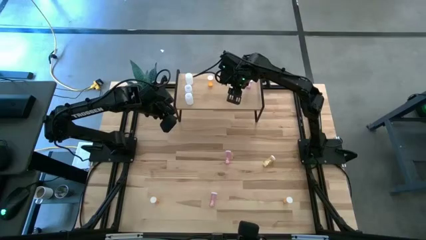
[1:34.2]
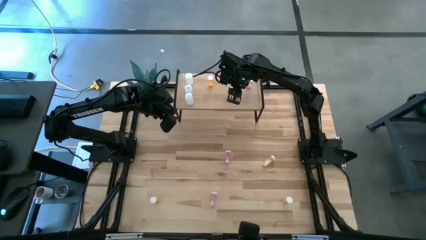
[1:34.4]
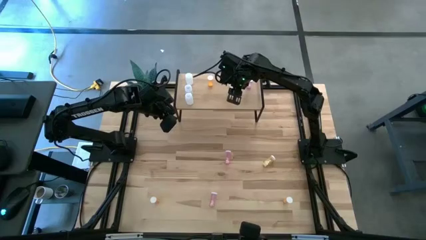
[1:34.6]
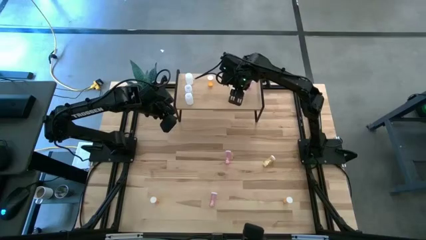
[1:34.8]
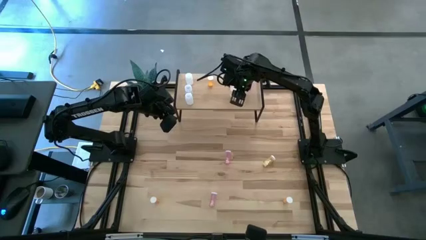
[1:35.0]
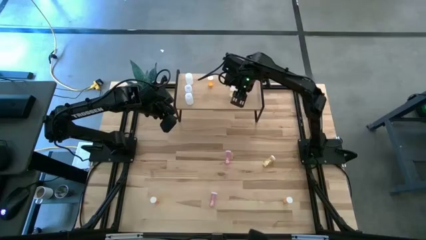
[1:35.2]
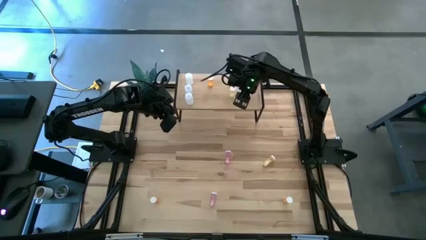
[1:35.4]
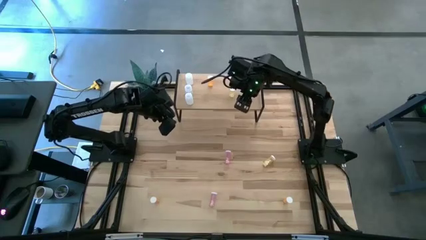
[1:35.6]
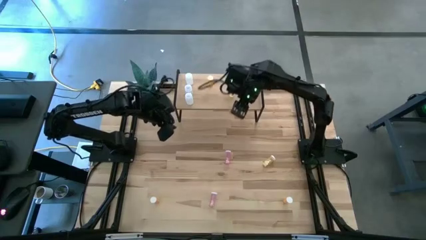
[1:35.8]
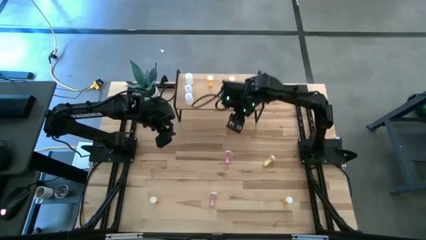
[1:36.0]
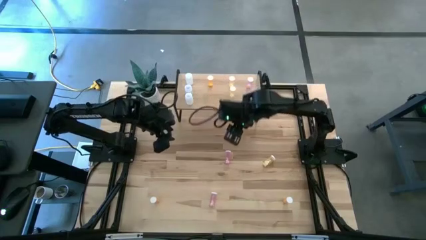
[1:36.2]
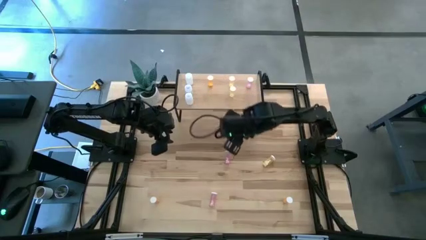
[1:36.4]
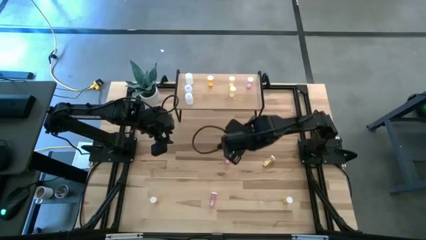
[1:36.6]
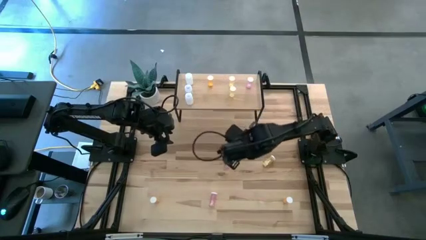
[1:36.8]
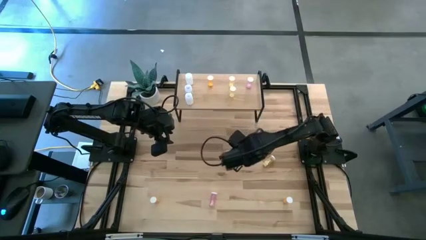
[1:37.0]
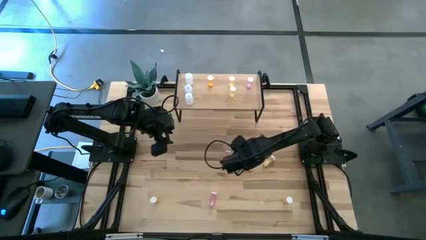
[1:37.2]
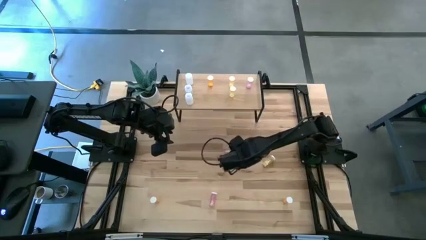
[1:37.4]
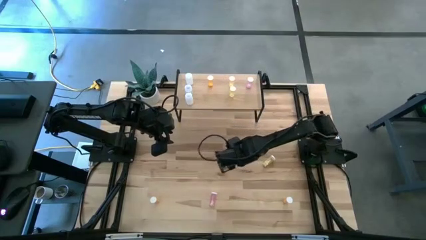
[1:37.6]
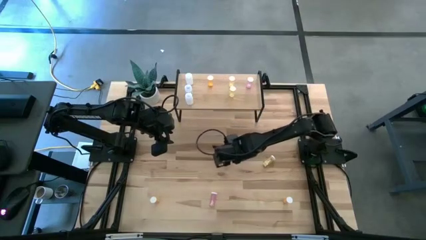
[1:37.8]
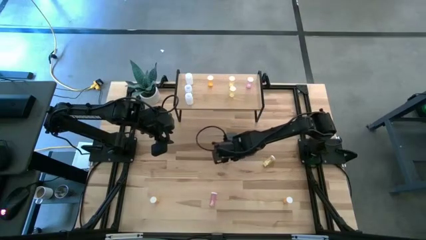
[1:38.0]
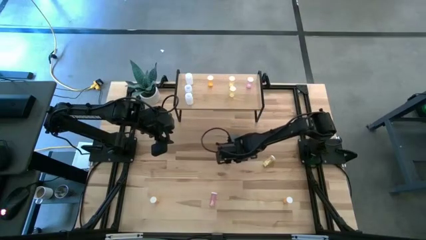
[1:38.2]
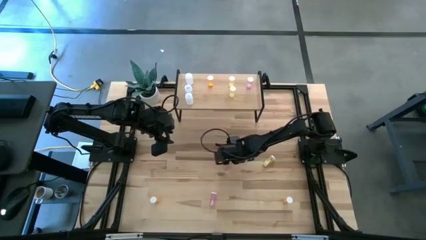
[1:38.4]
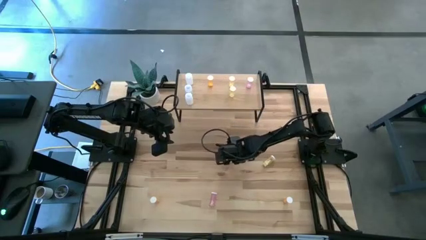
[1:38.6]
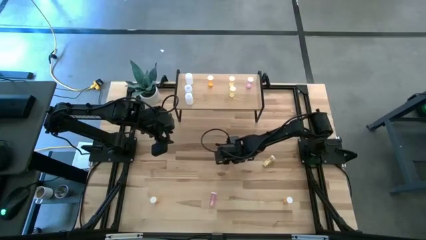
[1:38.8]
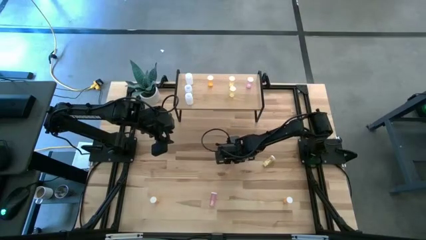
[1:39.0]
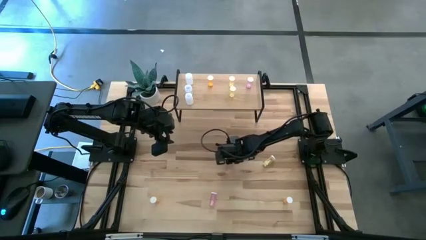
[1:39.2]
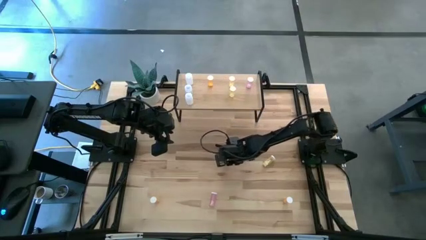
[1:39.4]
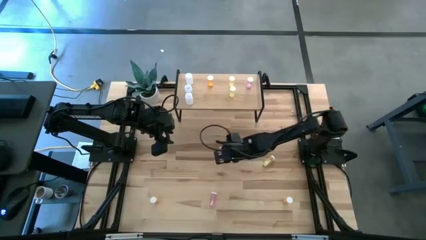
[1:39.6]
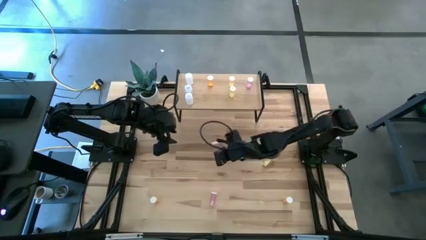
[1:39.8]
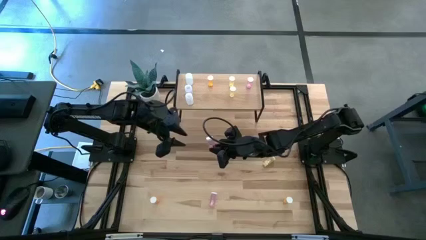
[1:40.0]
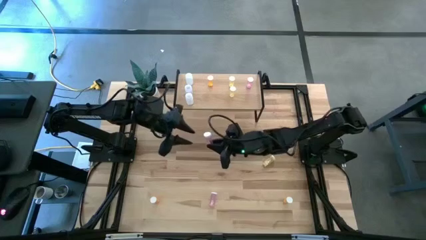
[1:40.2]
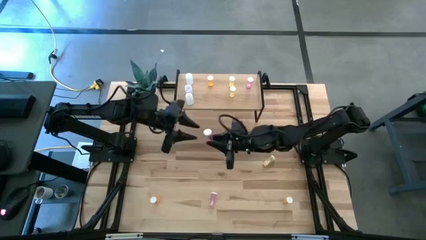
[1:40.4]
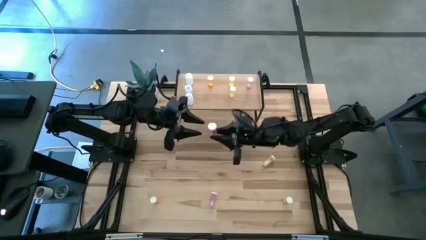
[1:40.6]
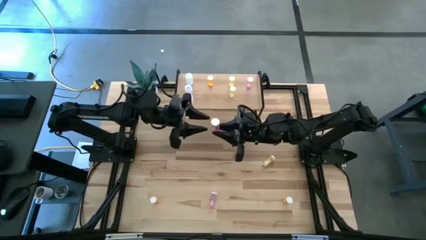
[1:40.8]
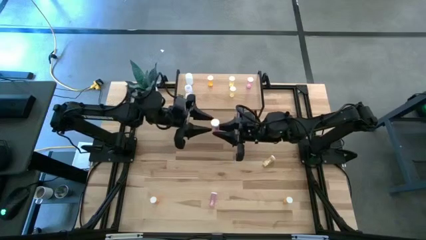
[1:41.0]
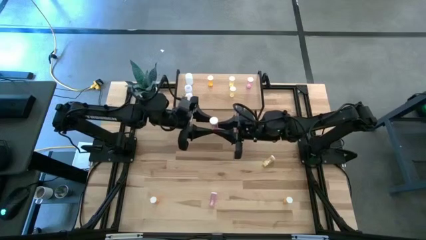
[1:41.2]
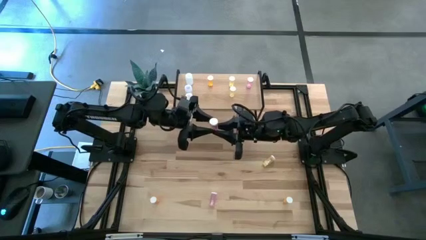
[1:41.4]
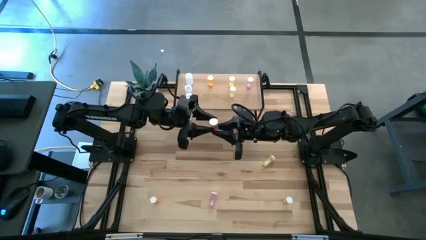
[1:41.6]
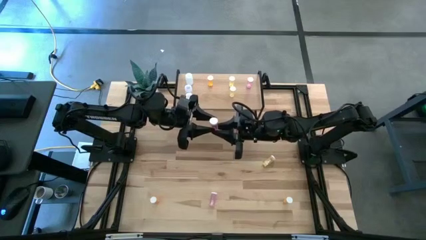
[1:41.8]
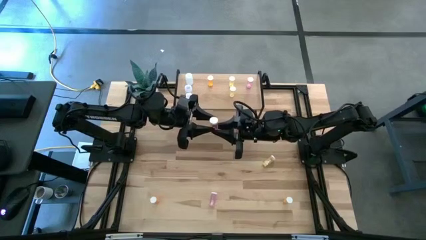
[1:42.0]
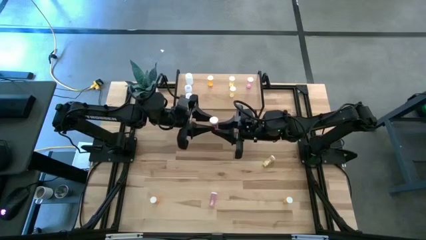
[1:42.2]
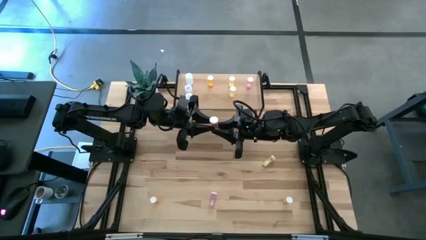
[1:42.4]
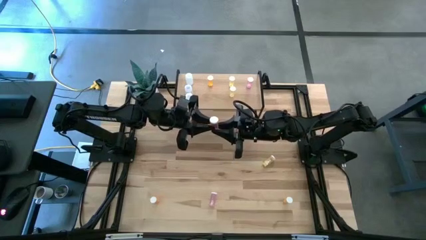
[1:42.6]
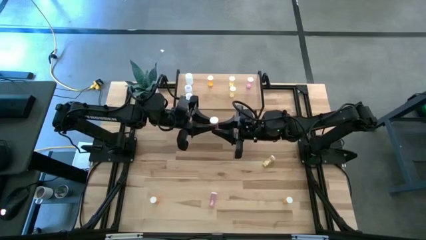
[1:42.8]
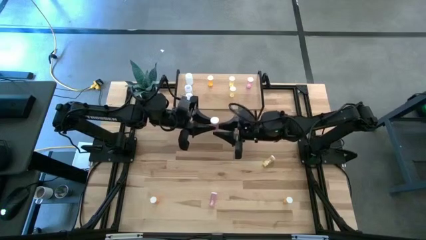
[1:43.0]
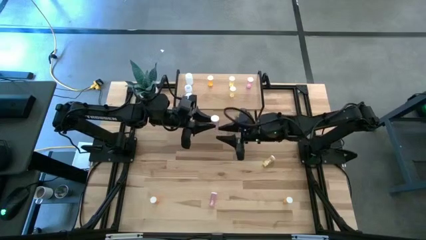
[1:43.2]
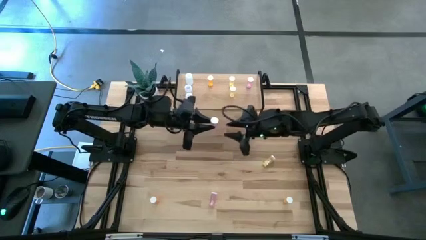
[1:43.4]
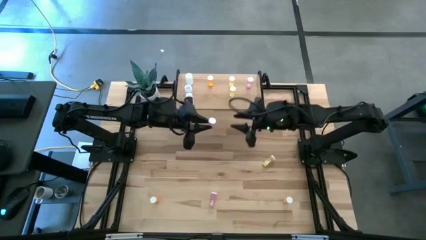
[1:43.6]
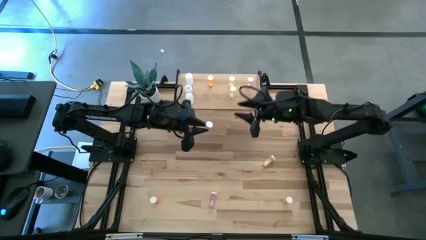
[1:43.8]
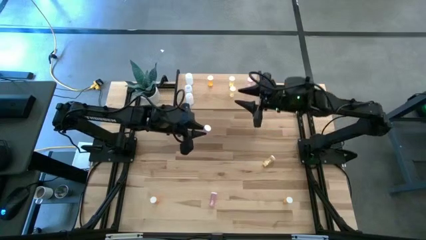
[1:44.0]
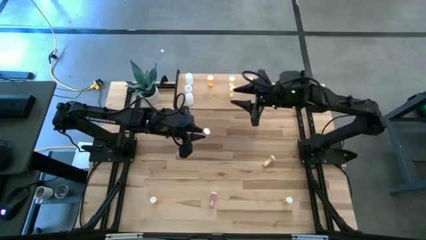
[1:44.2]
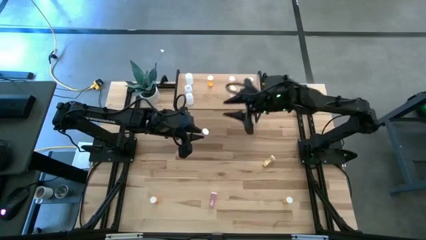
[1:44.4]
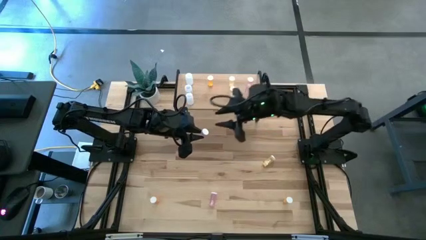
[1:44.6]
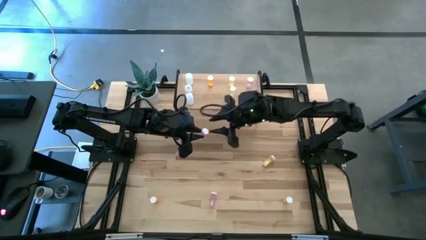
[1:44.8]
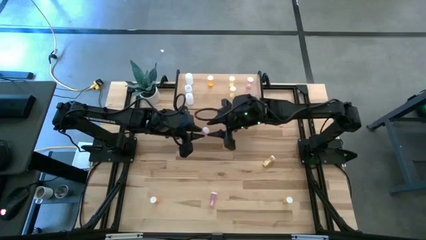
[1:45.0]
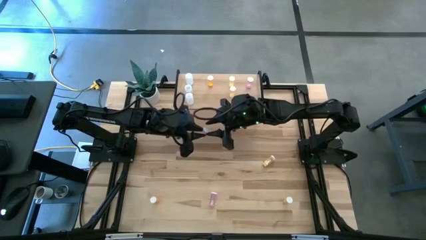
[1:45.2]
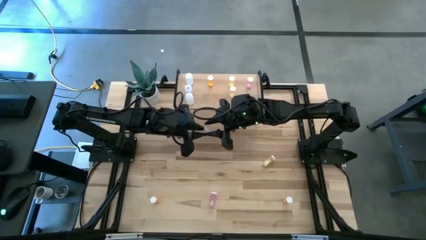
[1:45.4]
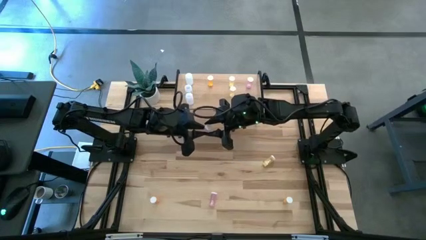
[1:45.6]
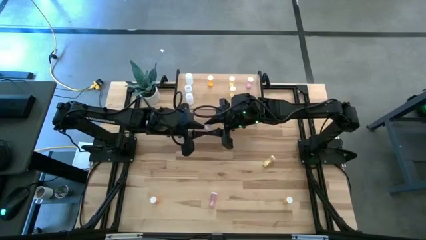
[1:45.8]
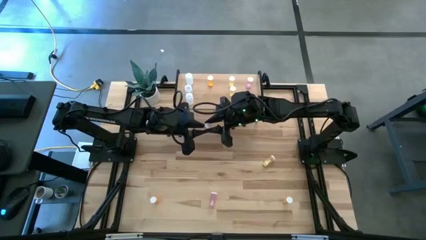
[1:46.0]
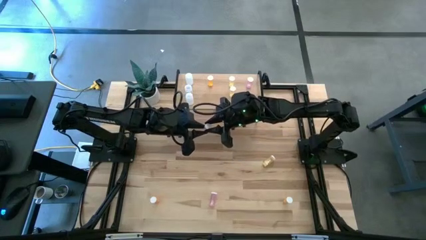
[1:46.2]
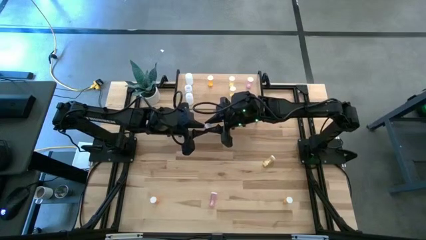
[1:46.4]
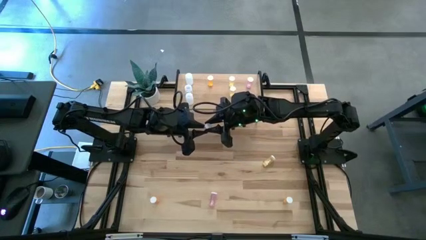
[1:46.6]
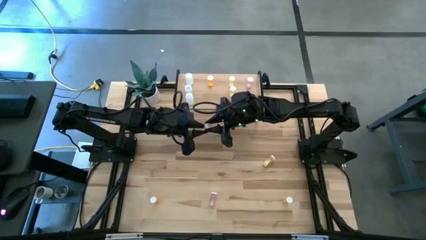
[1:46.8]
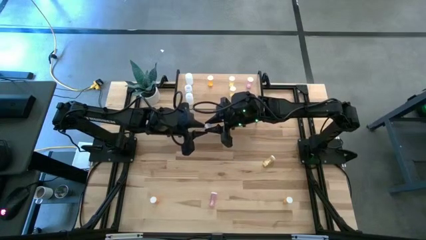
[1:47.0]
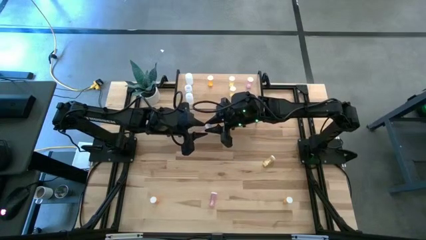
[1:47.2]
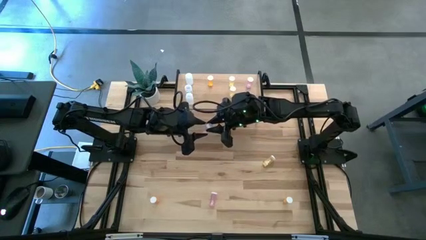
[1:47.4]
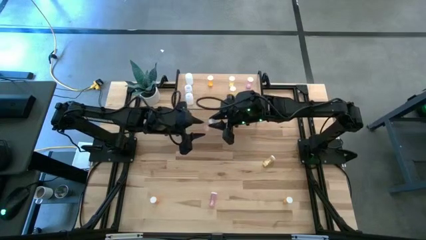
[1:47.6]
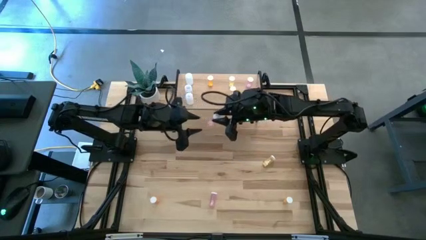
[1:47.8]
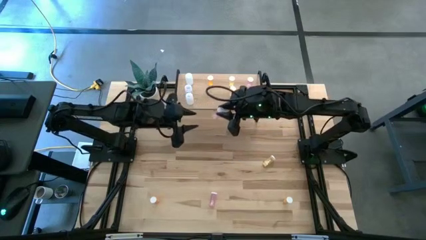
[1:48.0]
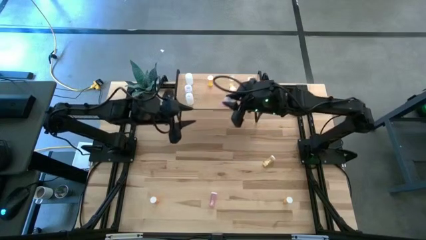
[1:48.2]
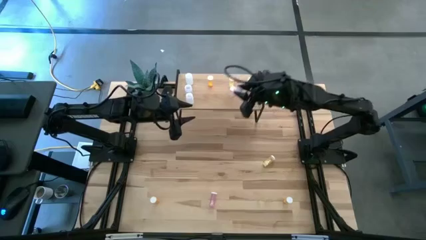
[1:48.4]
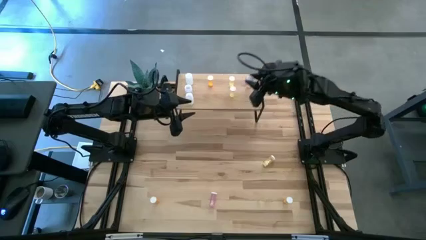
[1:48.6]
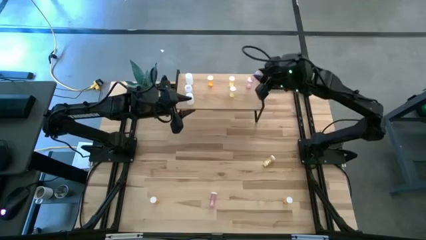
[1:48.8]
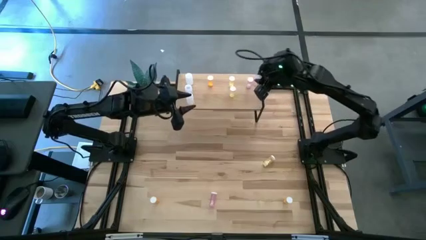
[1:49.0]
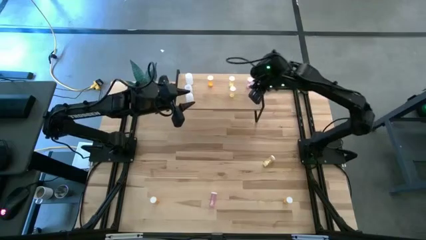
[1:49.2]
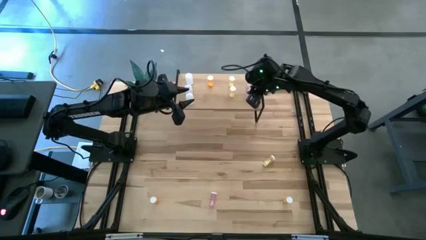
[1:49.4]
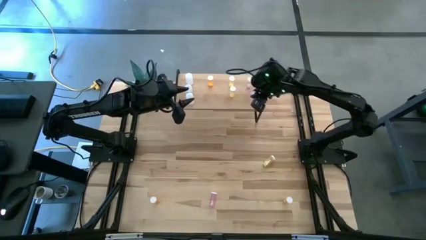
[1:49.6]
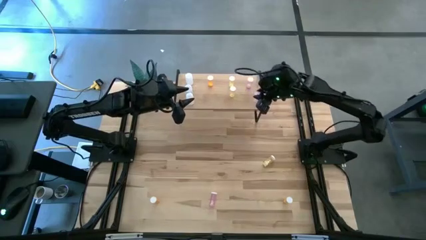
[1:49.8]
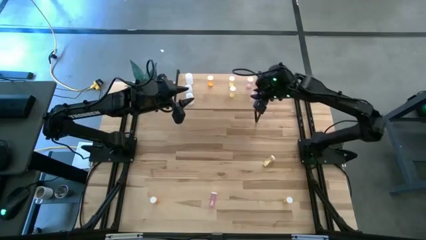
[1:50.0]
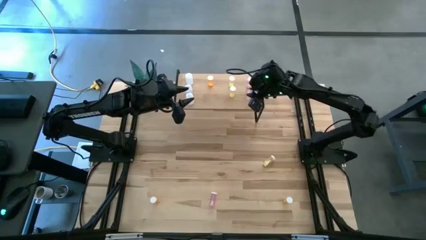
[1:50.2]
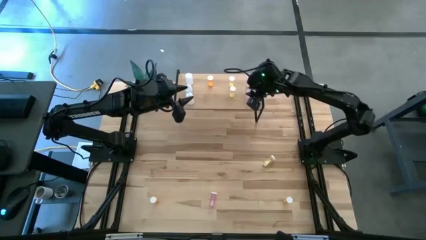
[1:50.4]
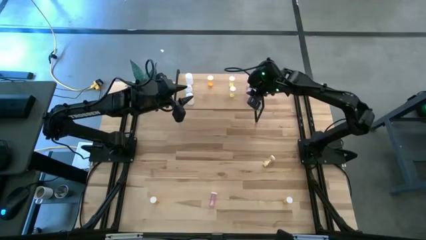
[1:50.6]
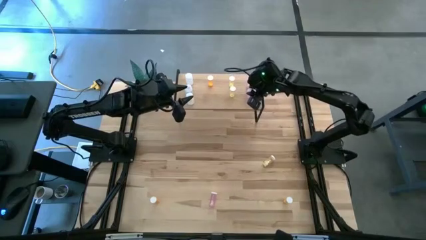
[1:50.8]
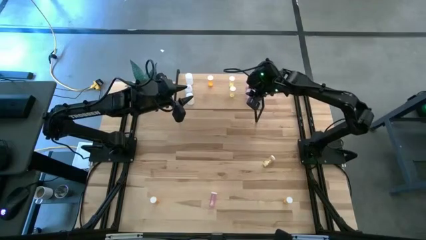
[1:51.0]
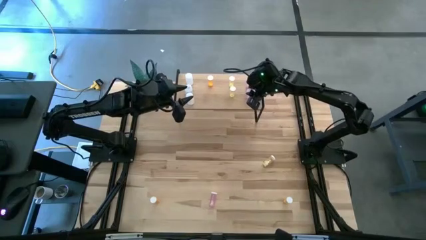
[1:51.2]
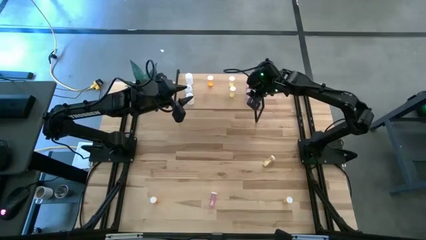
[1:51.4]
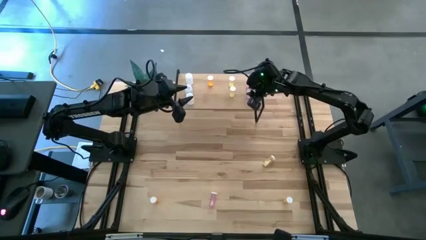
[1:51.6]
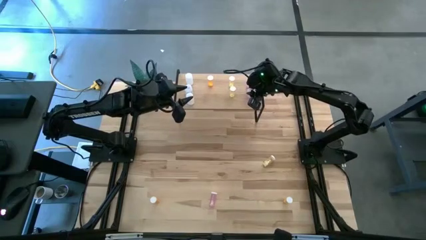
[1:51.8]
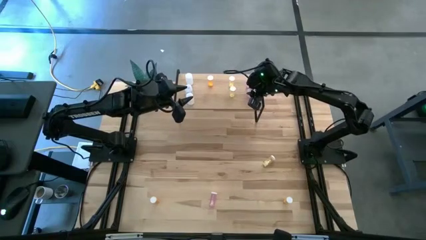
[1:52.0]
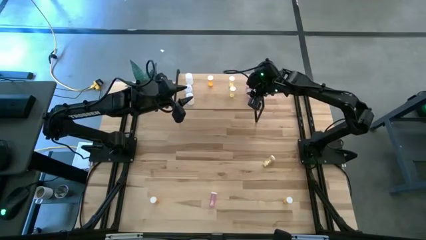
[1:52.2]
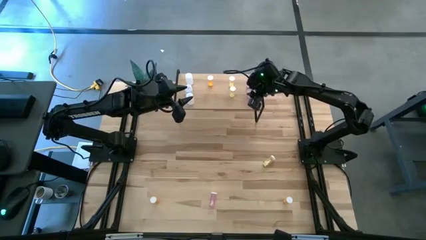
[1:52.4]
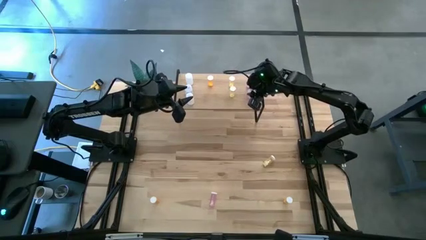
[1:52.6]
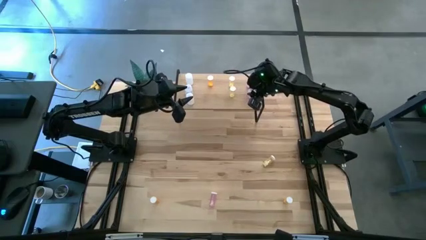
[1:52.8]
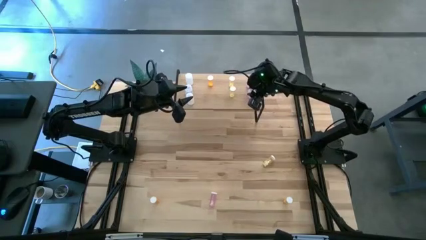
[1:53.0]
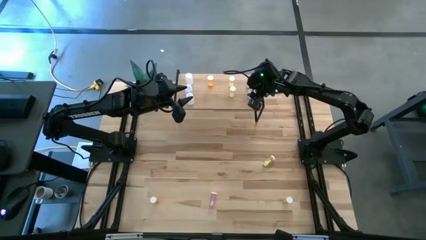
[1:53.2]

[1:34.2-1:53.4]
Task: Pick and place medicine bottles onto shelf by color
Put the top pink pill bottle on the shelf aligned with other pink pill bottle
